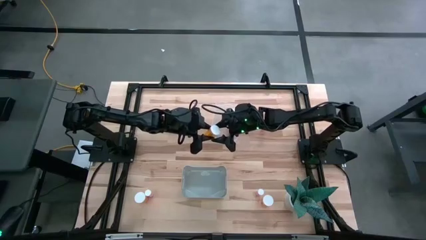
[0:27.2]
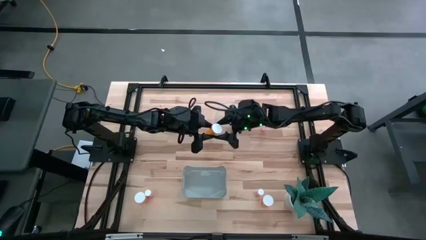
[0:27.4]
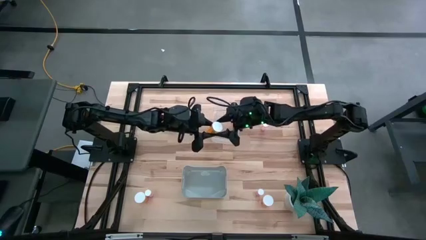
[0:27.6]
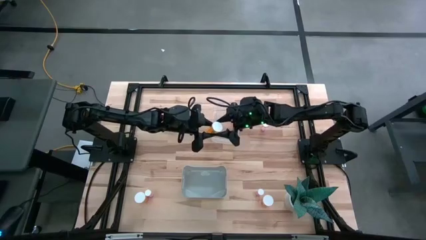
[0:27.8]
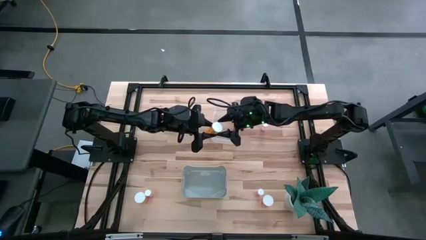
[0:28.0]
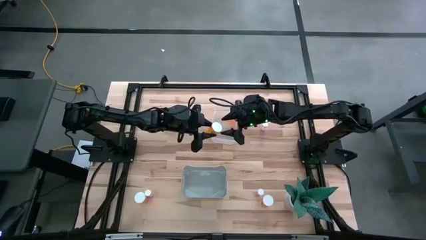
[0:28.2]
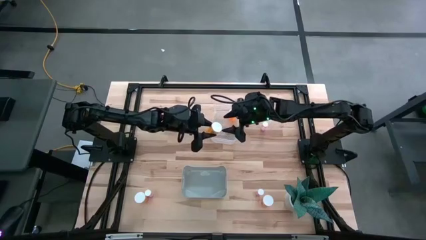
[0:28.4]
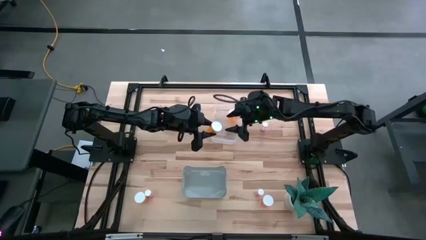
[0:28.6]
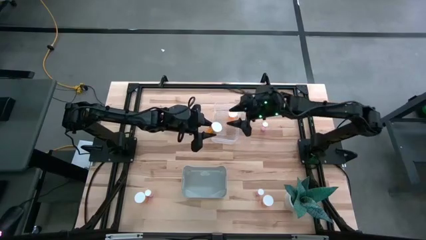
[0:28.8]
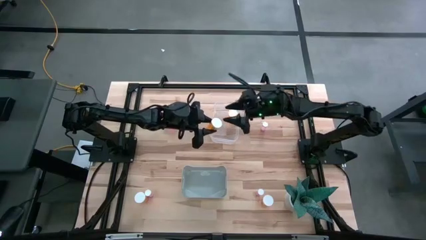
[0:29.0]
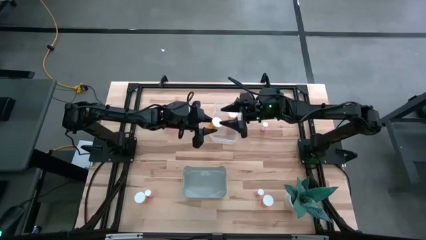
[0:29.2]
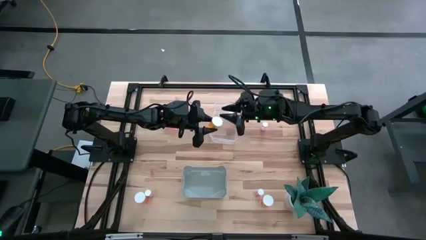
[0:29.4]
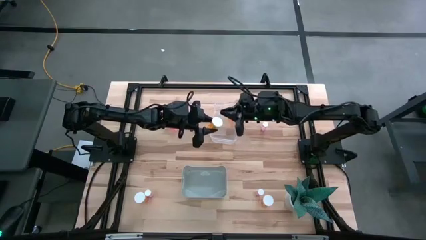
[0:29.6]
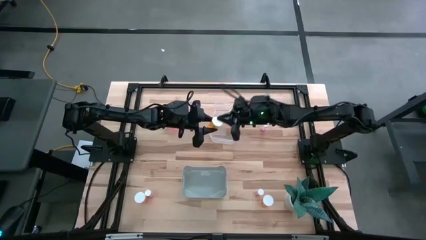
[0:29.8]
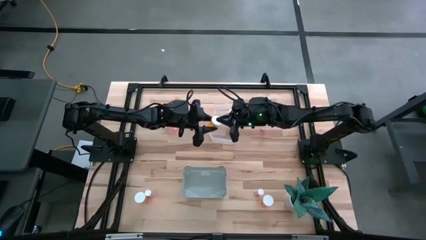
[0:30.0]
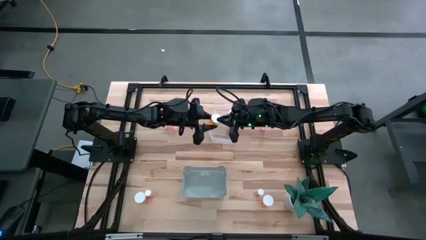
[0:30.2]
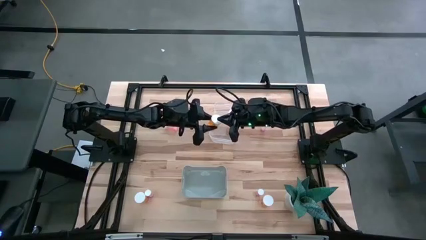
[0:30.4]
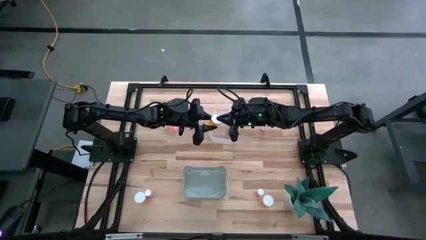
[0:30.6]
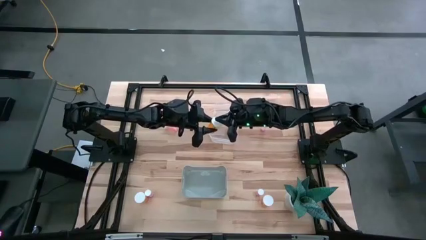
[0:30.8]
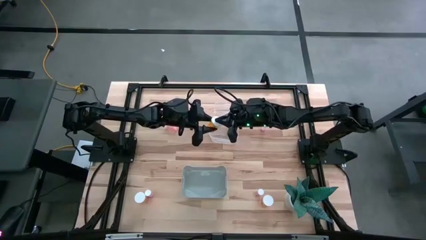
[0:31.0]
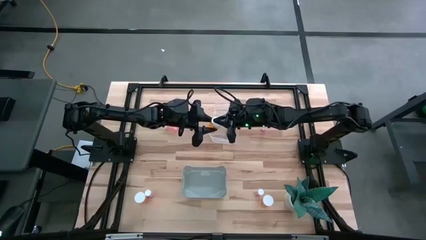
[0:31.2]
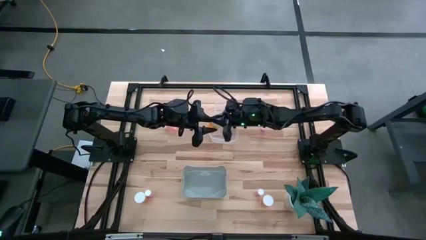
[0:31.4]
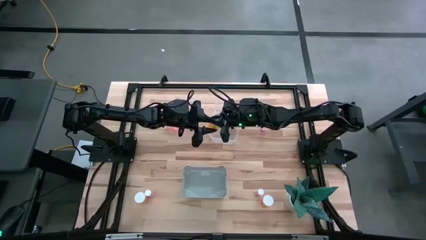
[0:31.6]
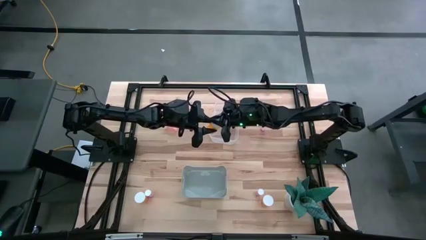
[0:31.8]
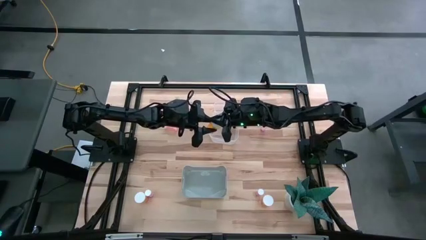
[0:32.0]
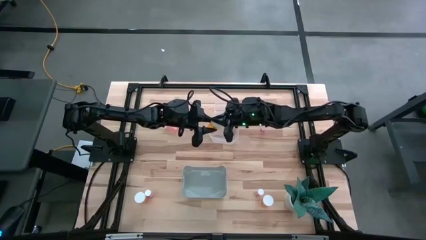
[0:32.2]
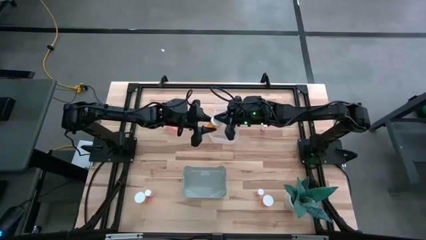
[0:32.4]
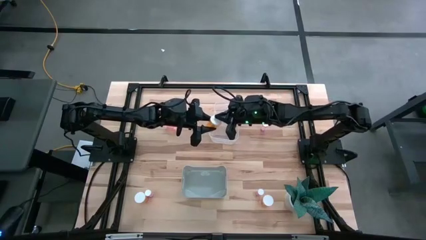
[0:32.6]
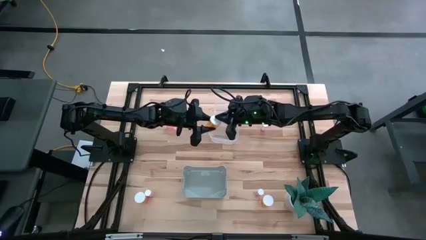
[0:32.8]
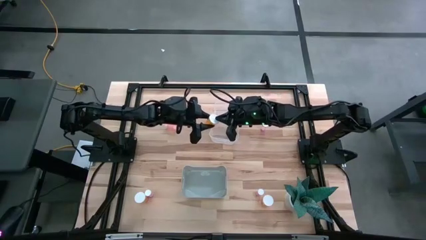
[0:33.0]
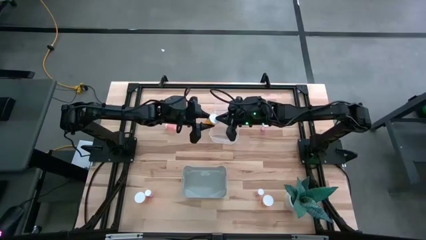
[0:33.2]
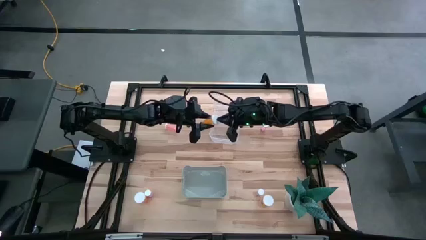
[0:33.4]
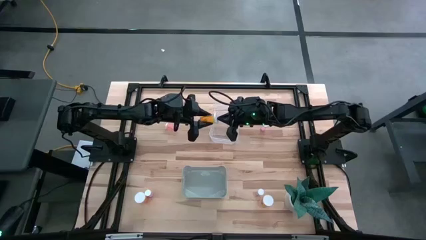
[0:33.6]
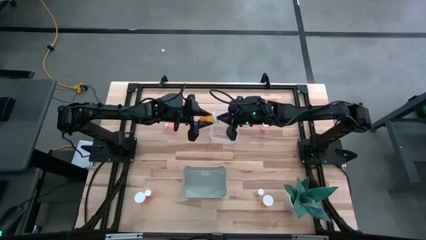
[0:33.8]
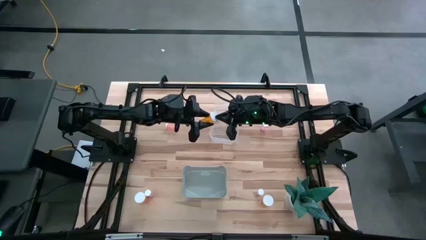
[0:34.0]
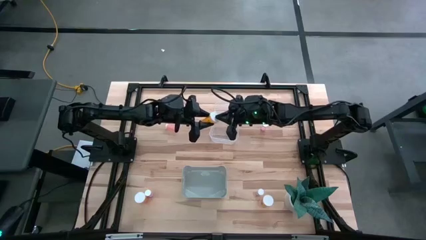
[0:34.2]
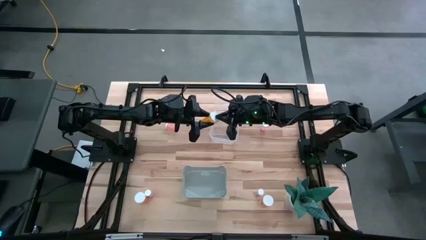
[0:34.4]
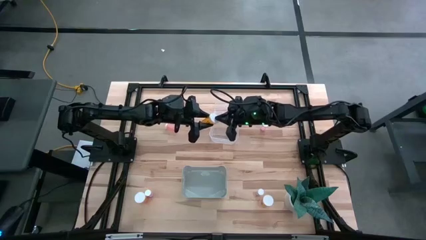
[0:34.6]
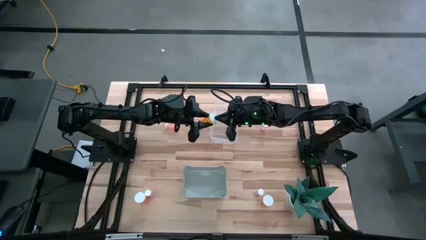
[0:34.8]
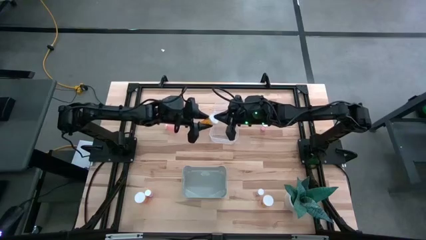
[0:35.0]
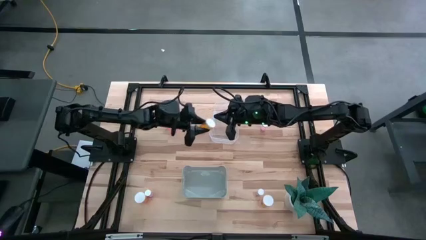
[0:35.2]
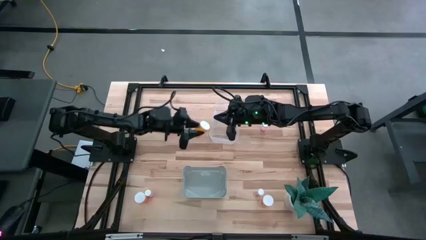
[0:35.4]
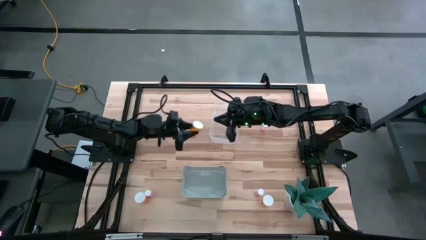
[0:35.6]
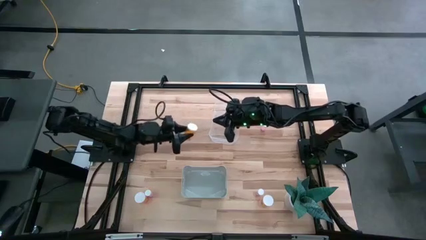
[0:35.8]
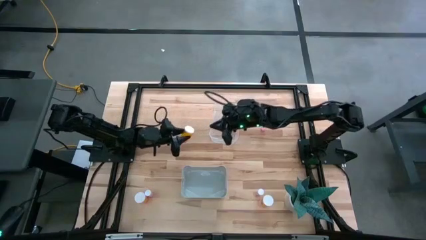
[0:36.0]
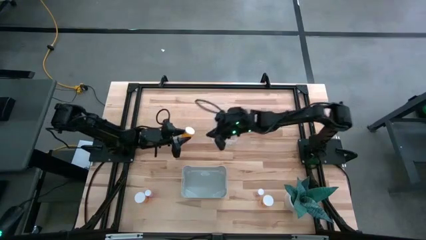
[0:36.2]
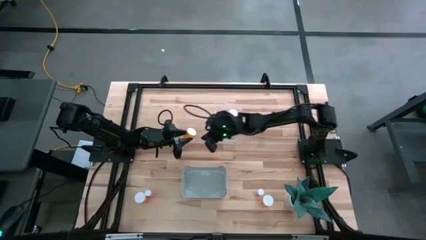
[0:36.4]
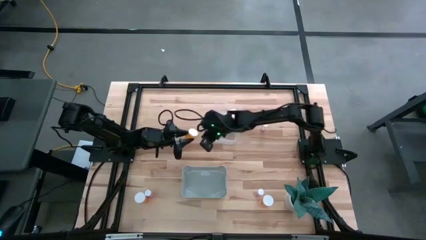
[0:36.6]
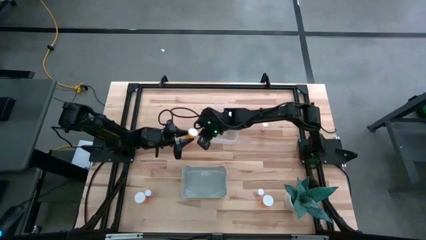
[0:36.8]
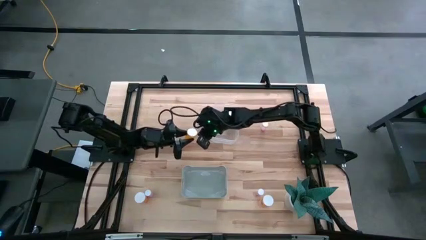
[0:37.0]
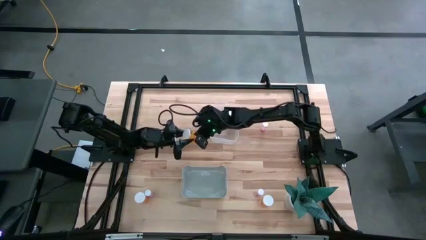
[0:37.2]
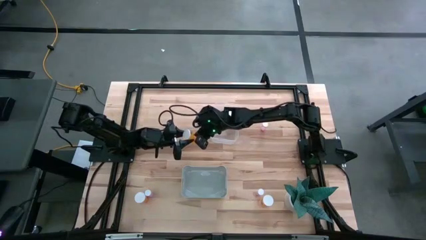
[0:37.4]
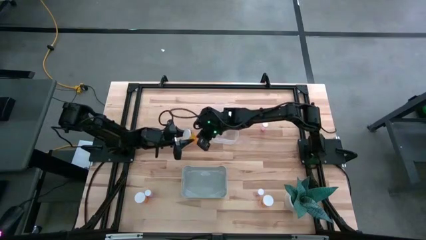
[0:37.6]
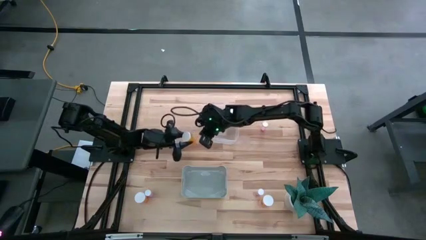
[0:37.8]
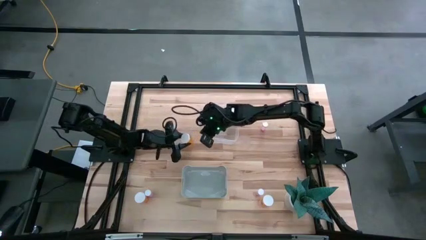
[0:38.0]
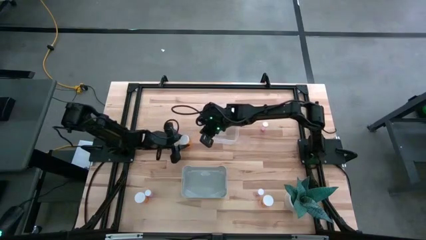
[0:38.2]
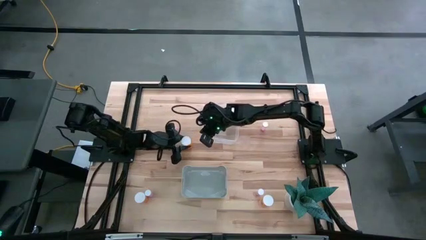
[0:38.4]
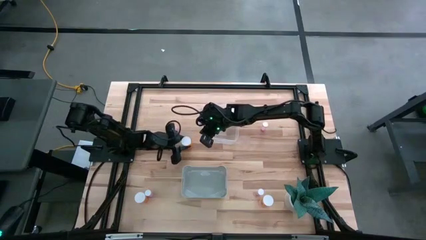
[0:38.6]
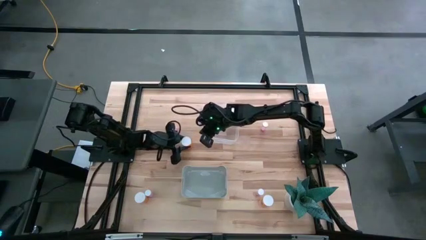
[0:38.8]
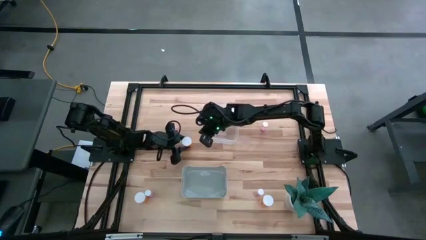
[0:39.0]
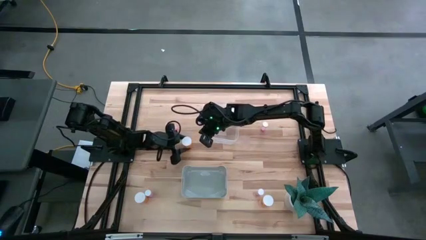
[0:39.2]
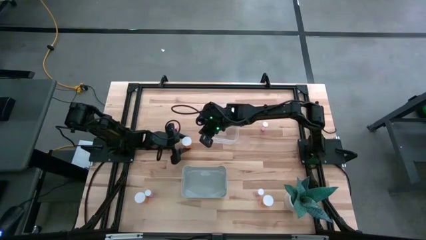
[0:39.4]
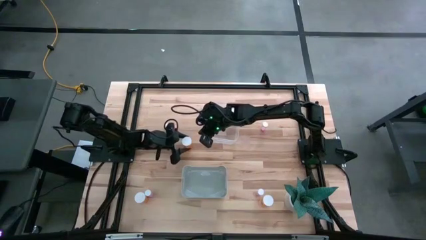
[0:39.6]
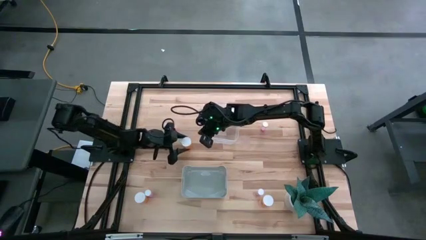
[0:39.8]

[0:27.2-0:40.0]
Task: Pick and place medicine bottles into bin by pill shape (circle, oval)
Put the top left orange pill bottle into the transparent bin
